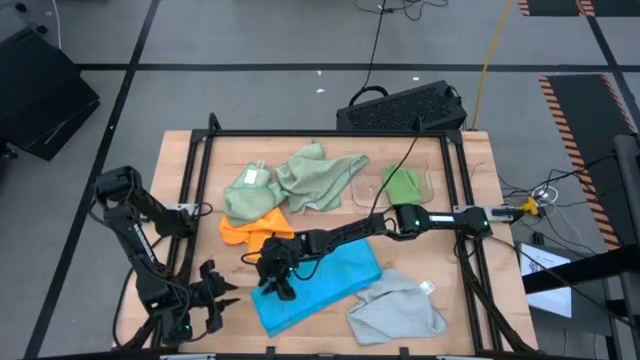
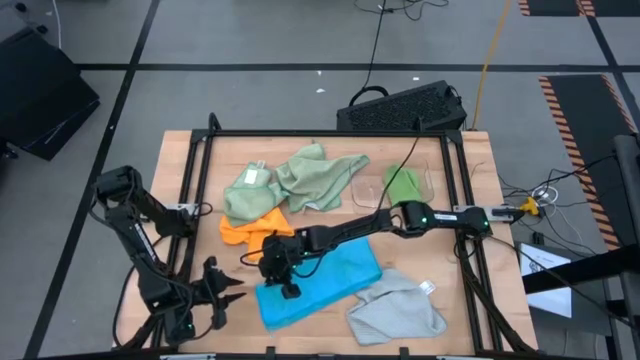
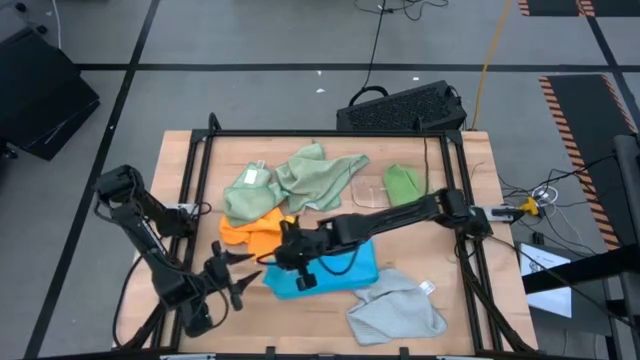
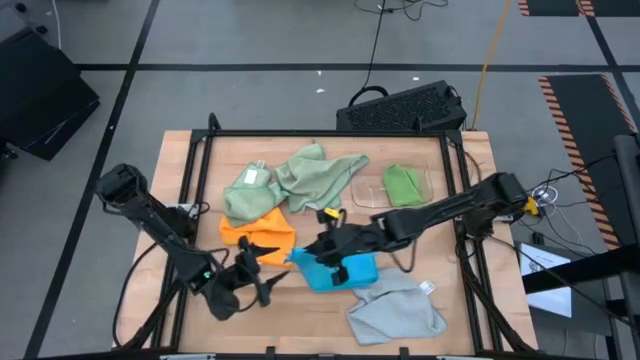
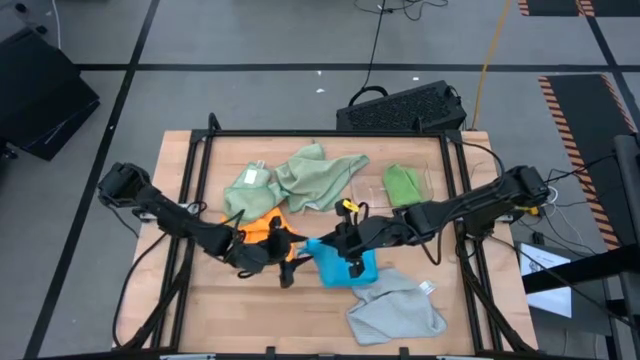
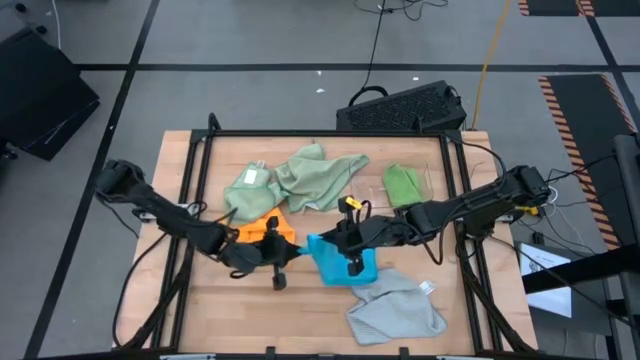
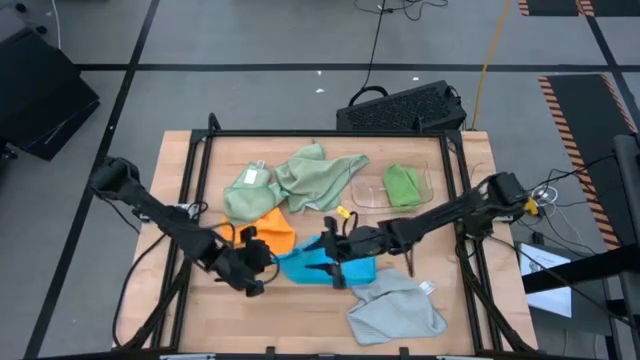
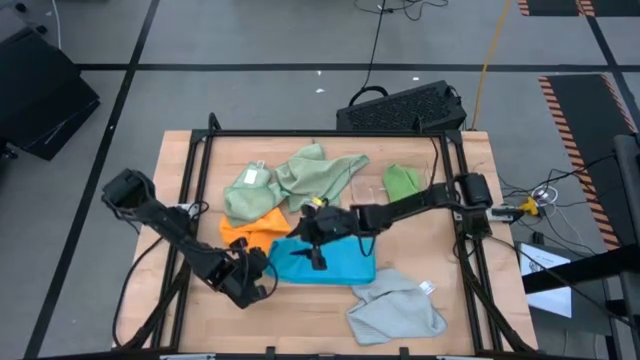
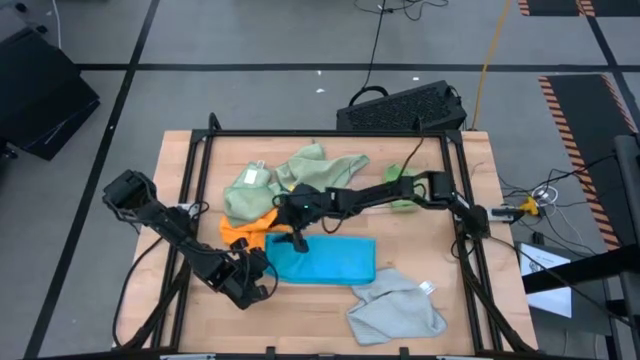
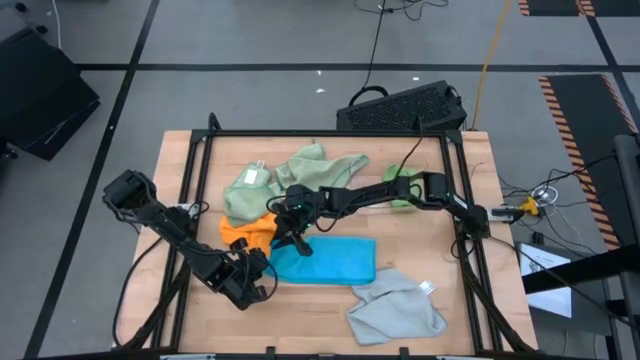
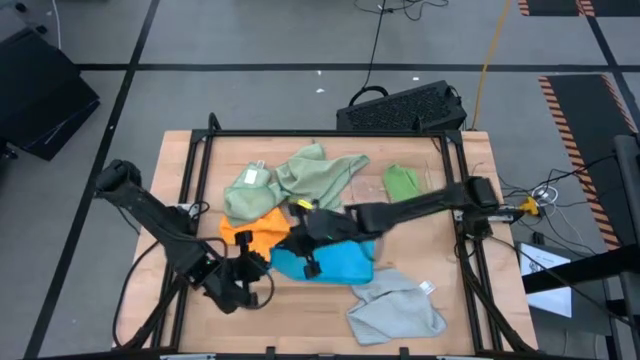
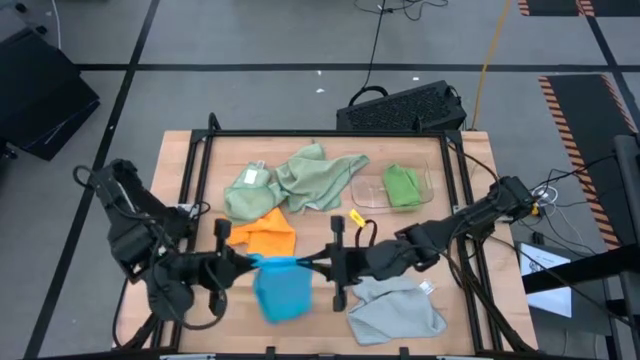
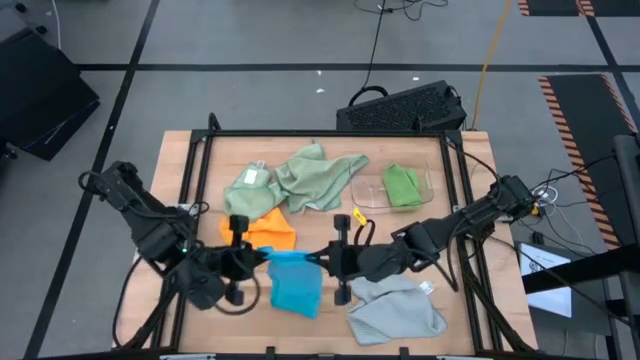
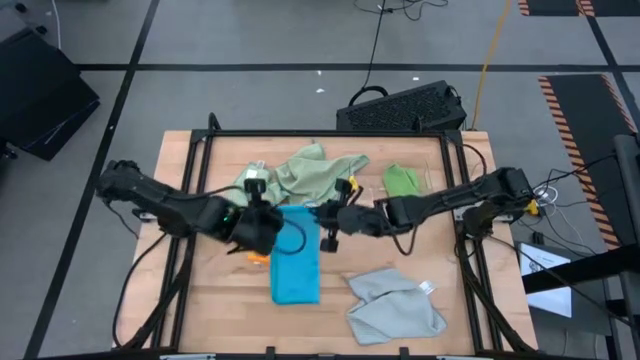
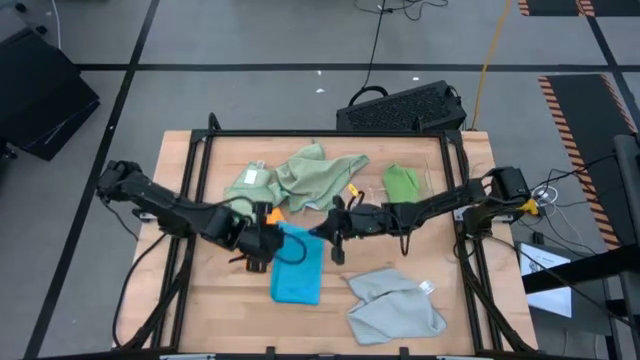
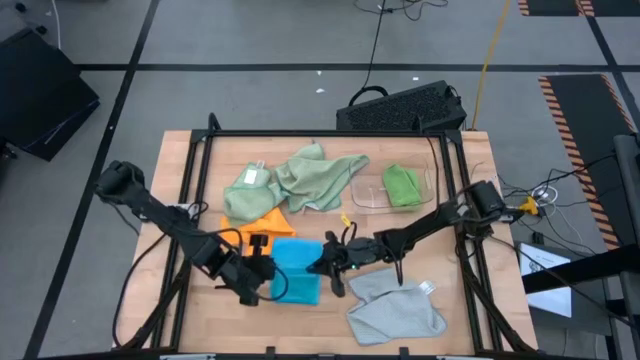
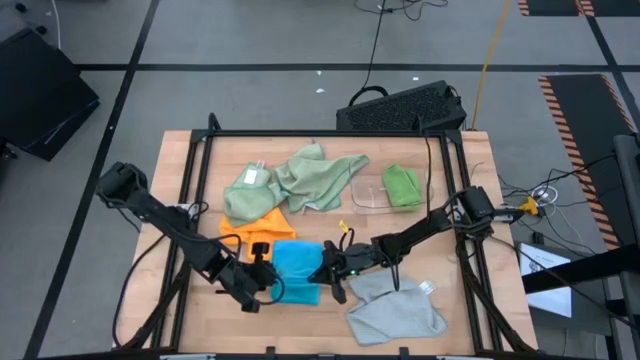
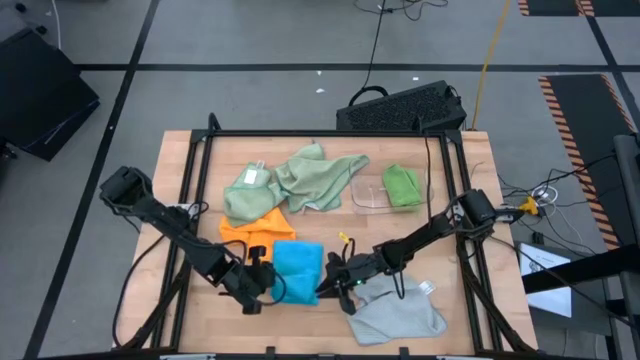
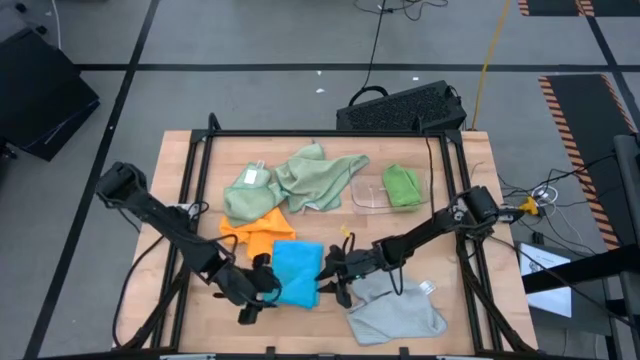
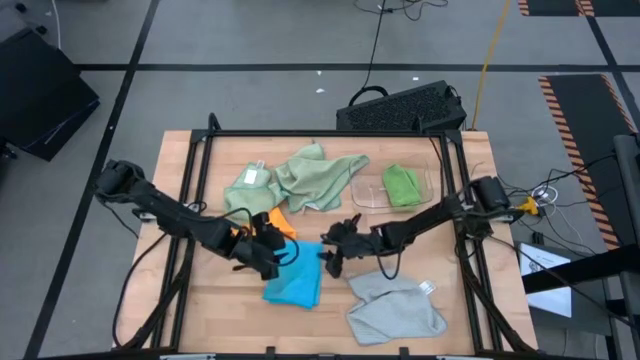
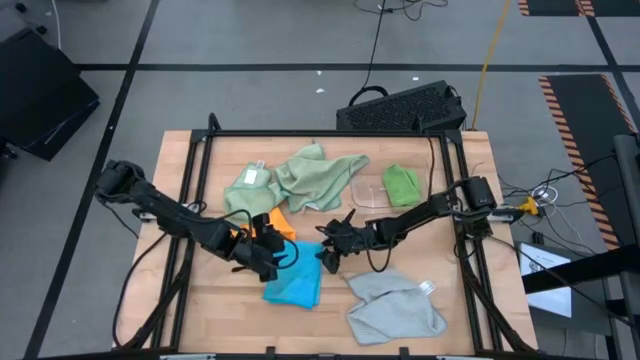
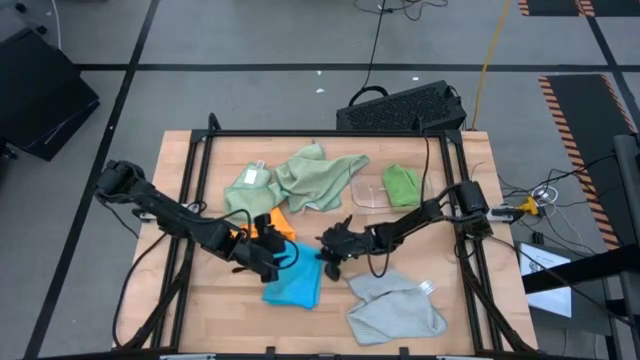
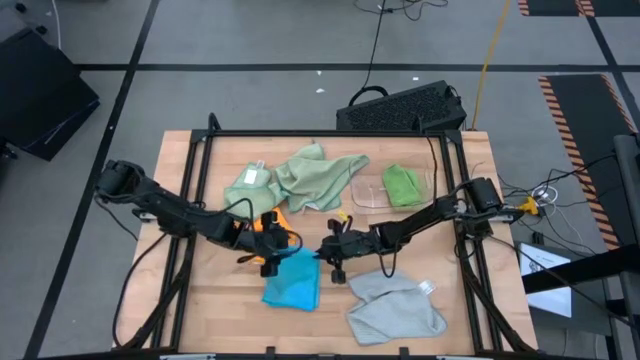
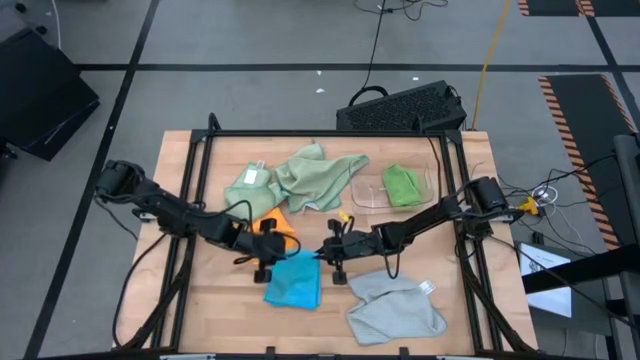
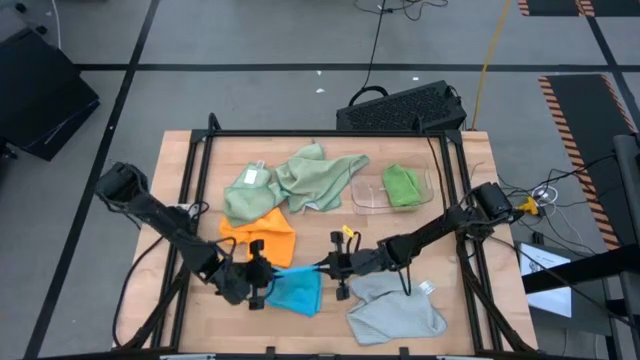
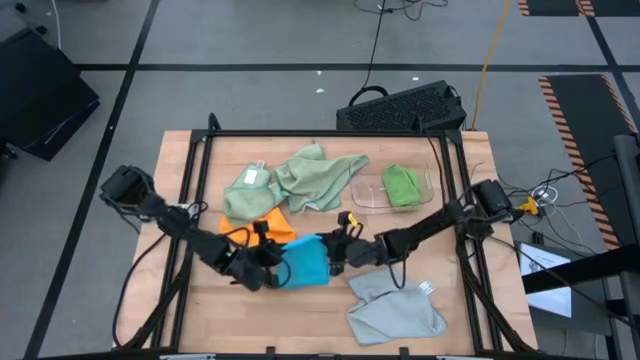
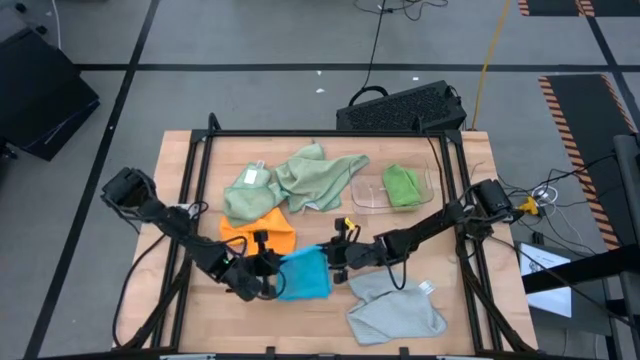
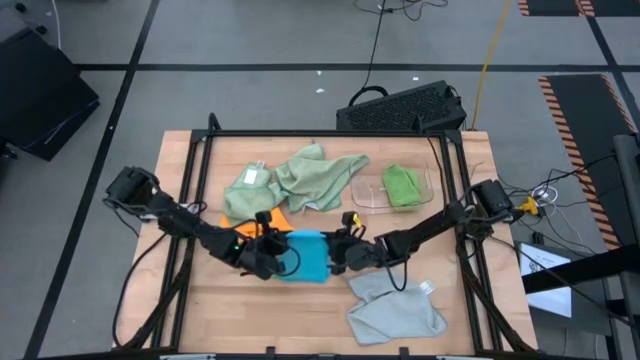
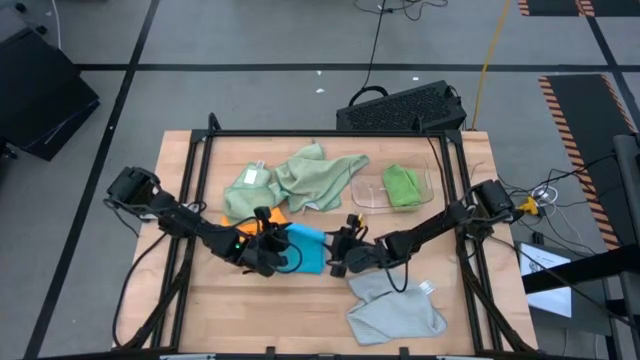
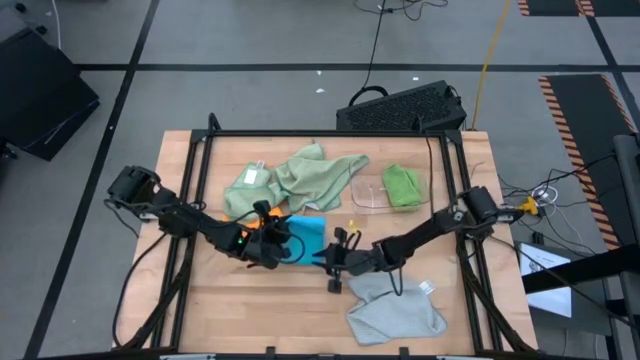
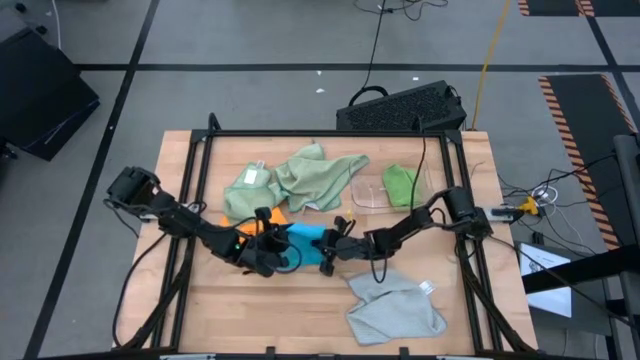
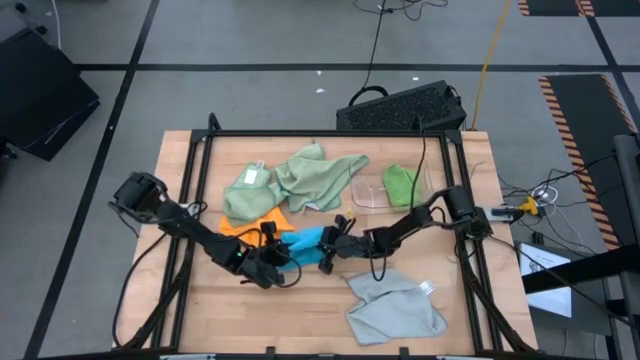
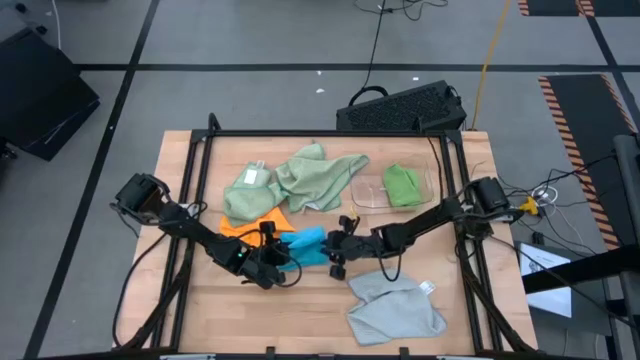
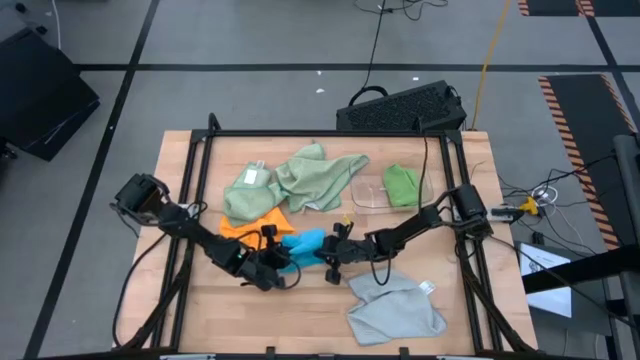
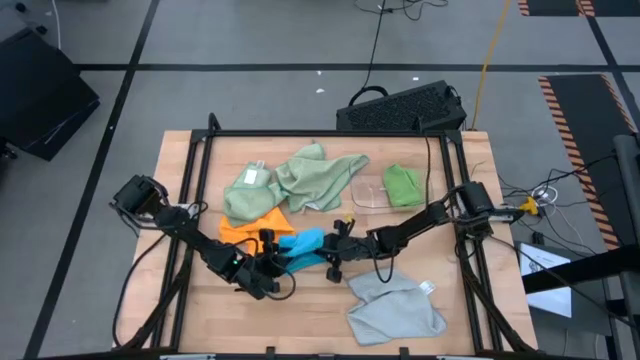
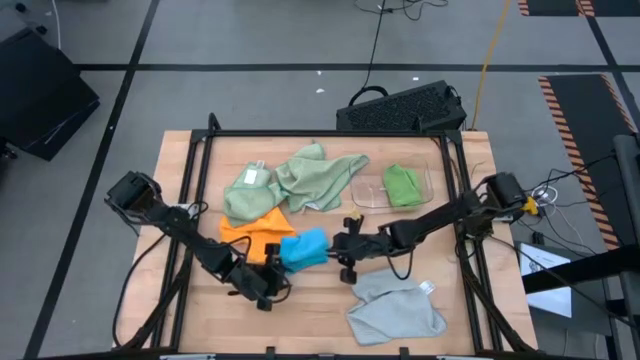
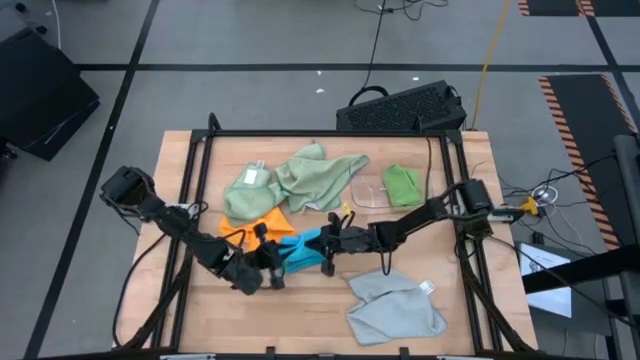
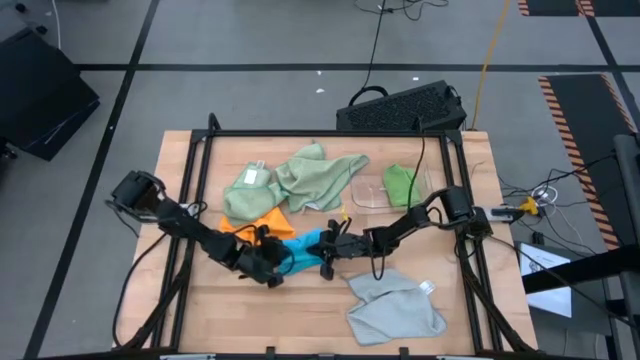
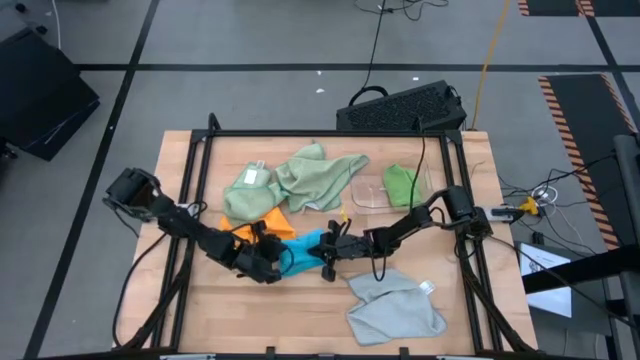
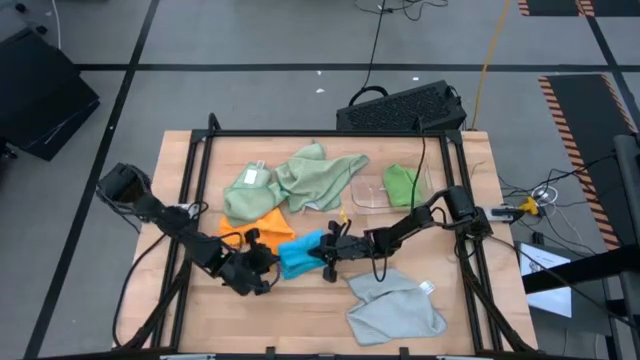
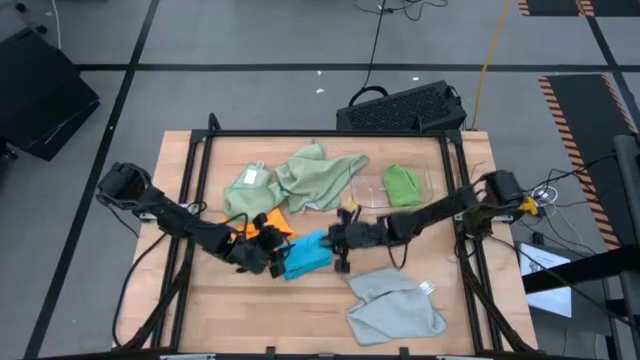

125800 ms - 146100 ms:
Task: Fold microfiber towels
Fold the blue microfiber cloth

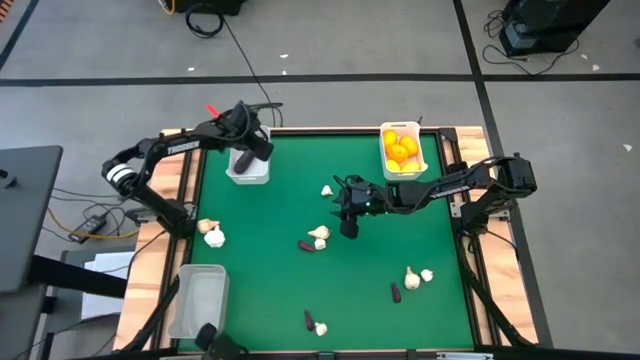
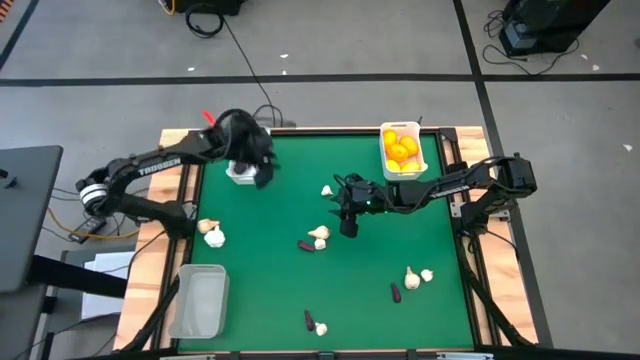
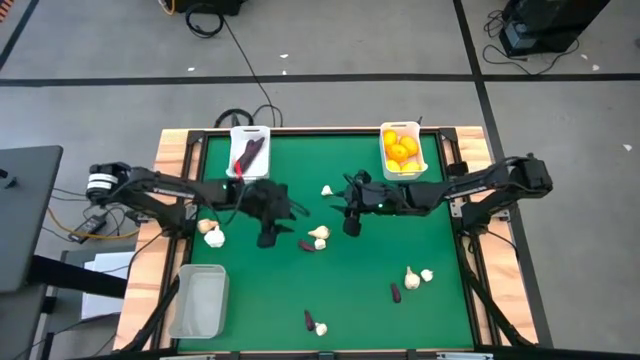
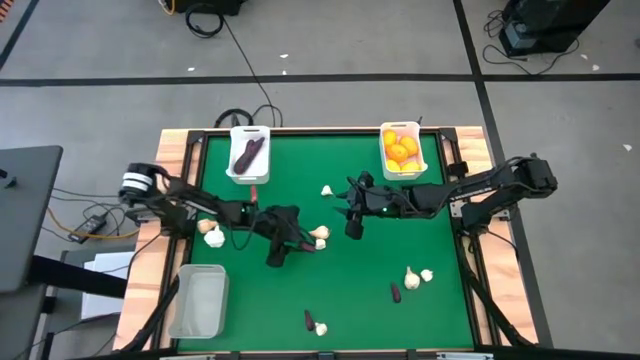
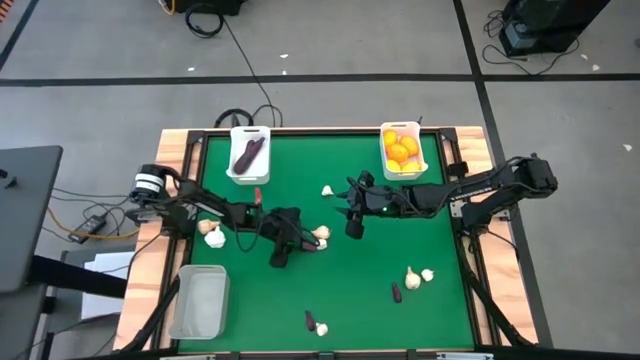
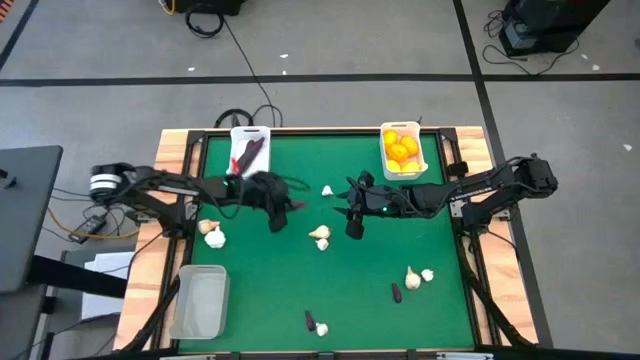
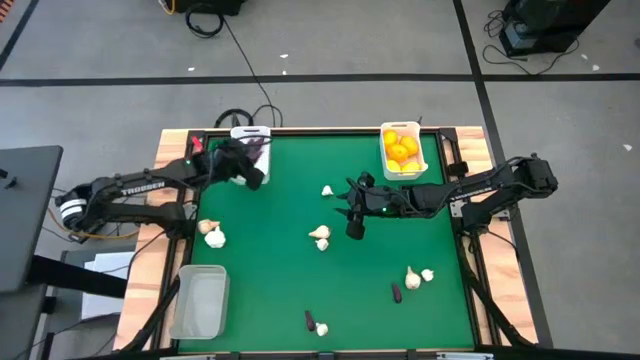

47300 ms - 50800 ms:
Task: Sort produce into baskets
Put the top eggplant into the left white bin
